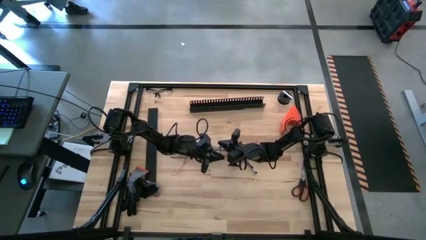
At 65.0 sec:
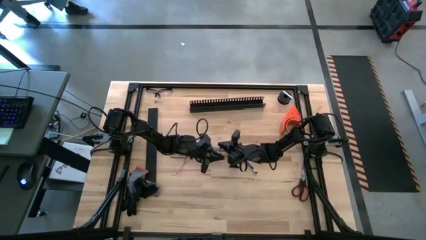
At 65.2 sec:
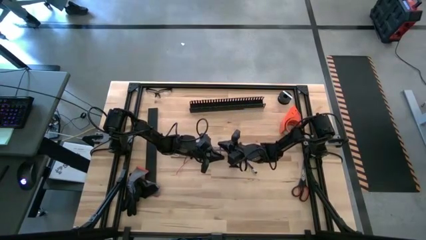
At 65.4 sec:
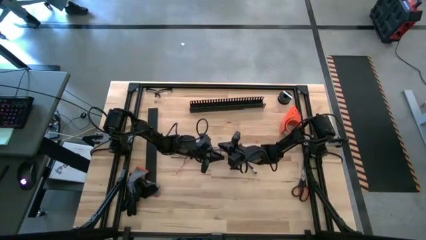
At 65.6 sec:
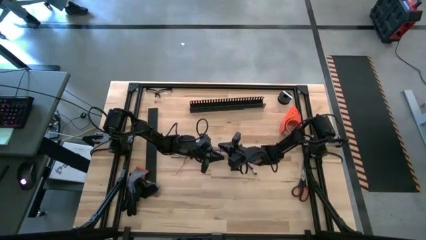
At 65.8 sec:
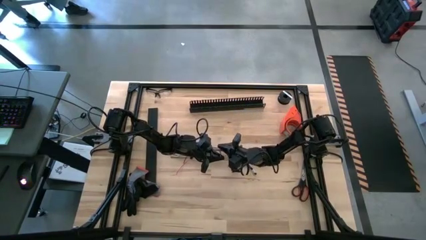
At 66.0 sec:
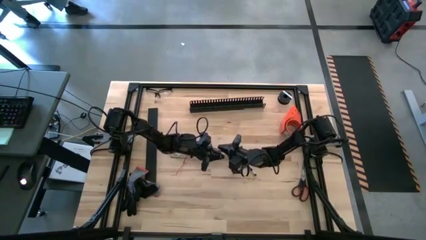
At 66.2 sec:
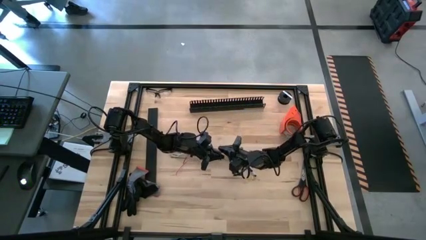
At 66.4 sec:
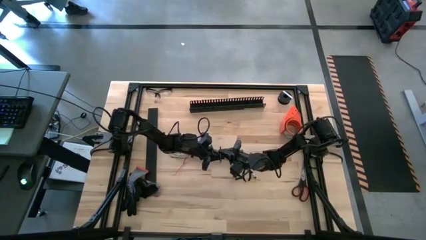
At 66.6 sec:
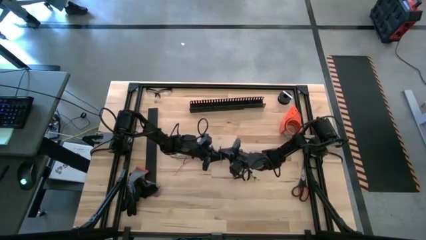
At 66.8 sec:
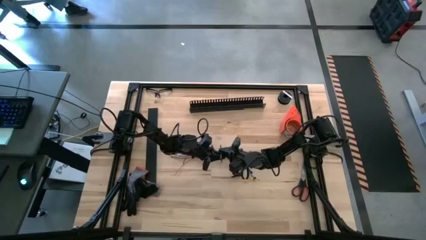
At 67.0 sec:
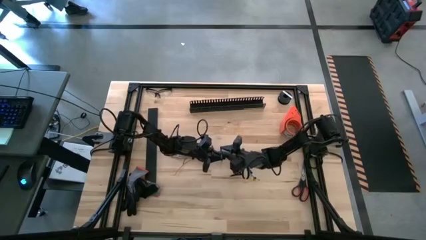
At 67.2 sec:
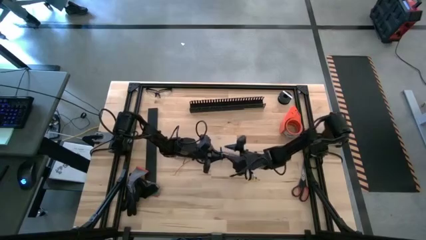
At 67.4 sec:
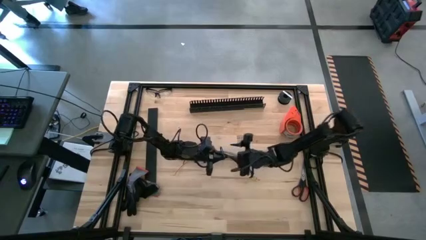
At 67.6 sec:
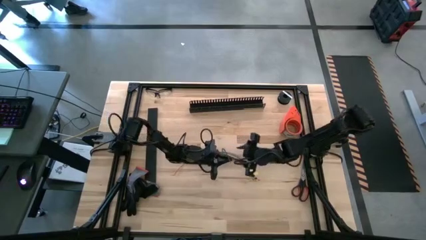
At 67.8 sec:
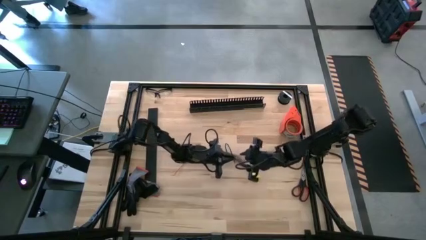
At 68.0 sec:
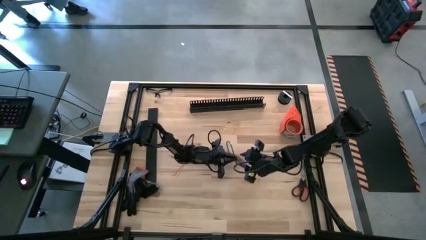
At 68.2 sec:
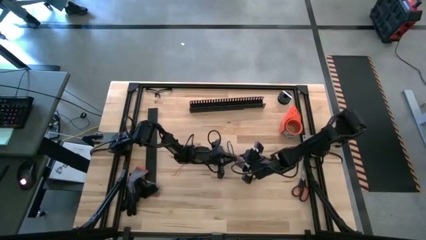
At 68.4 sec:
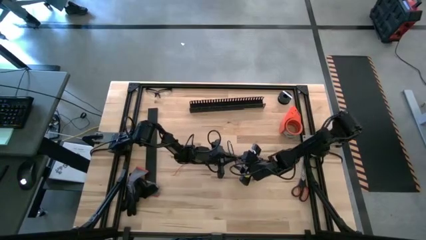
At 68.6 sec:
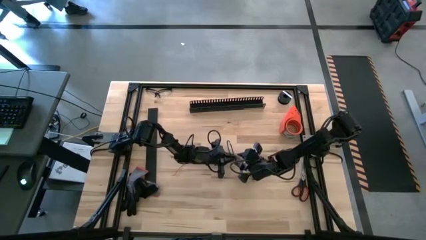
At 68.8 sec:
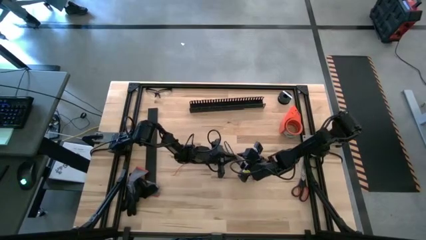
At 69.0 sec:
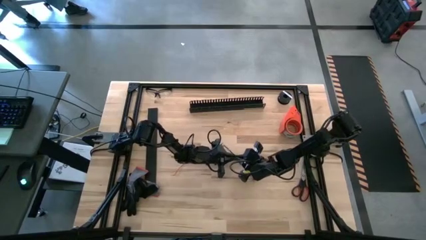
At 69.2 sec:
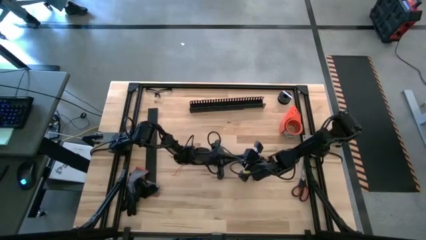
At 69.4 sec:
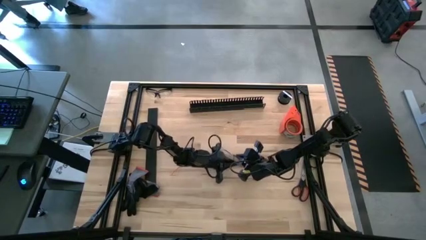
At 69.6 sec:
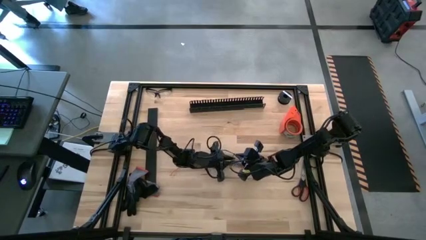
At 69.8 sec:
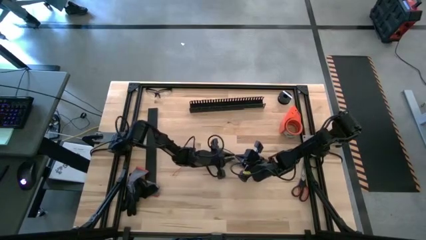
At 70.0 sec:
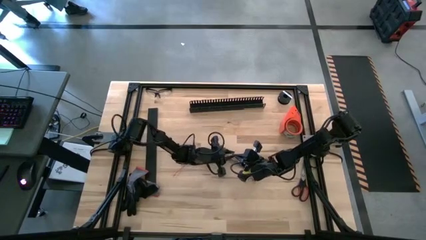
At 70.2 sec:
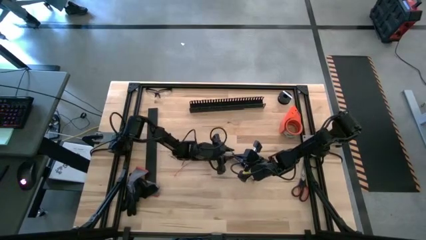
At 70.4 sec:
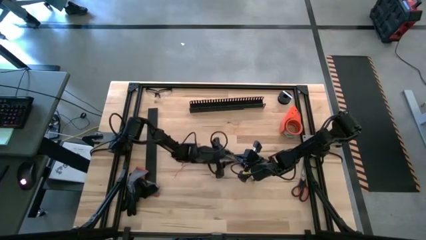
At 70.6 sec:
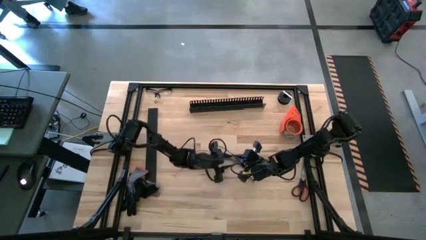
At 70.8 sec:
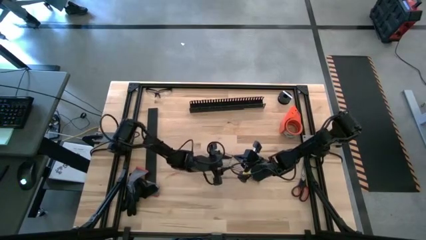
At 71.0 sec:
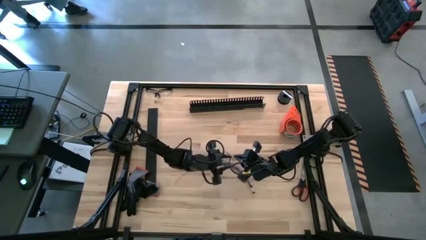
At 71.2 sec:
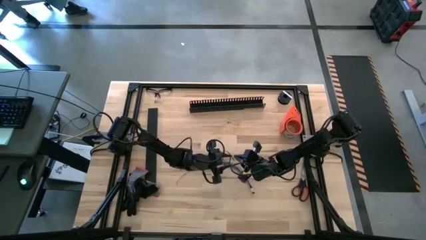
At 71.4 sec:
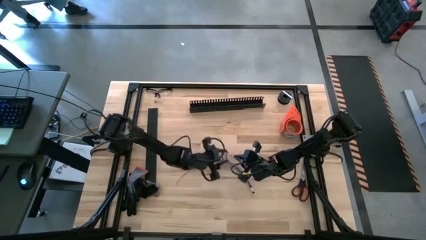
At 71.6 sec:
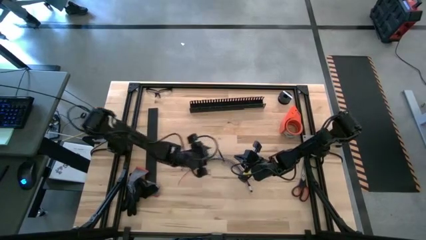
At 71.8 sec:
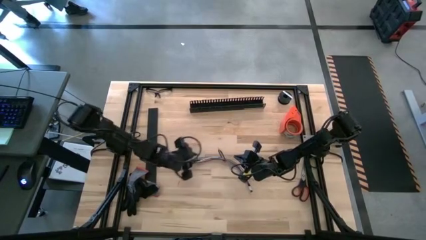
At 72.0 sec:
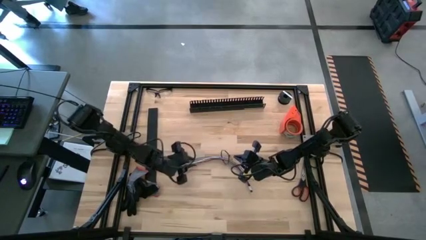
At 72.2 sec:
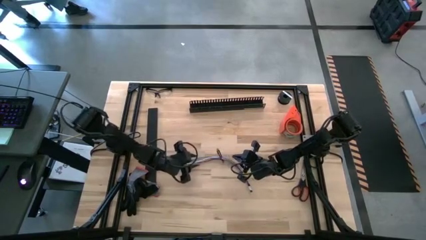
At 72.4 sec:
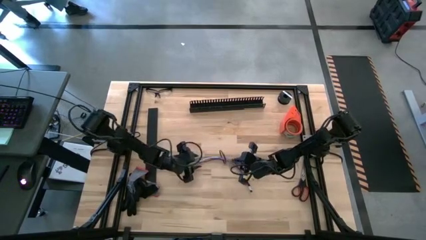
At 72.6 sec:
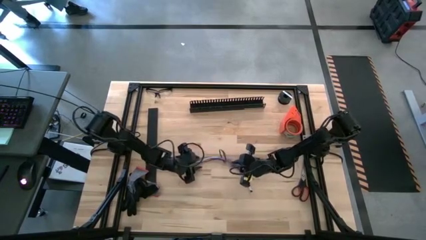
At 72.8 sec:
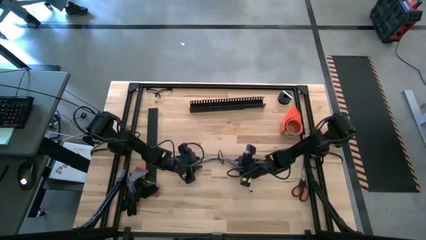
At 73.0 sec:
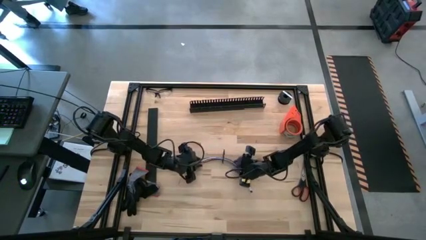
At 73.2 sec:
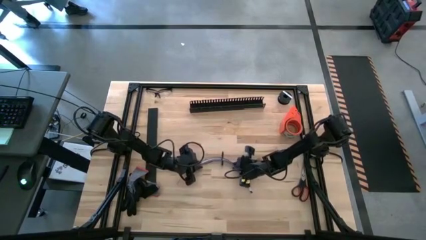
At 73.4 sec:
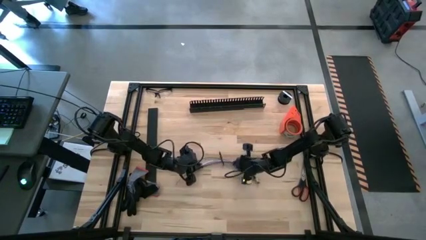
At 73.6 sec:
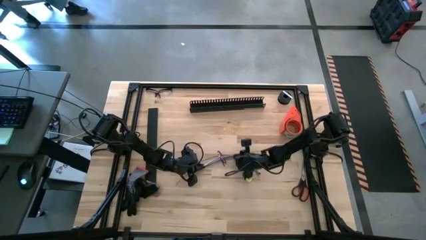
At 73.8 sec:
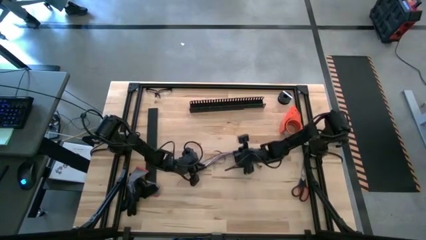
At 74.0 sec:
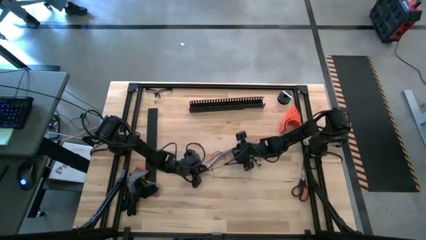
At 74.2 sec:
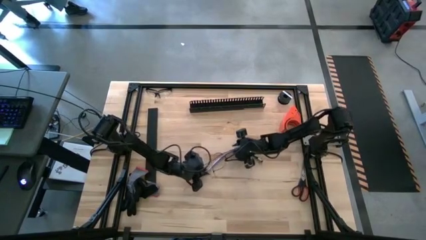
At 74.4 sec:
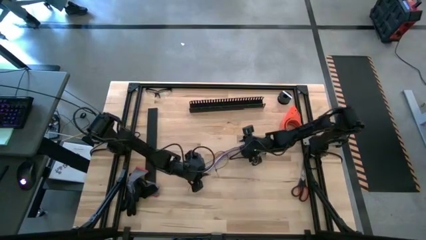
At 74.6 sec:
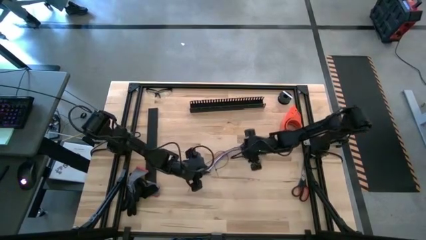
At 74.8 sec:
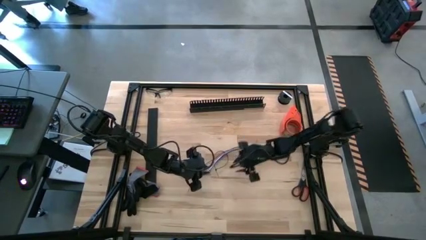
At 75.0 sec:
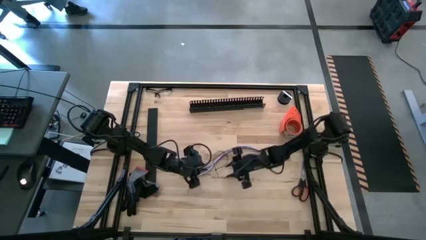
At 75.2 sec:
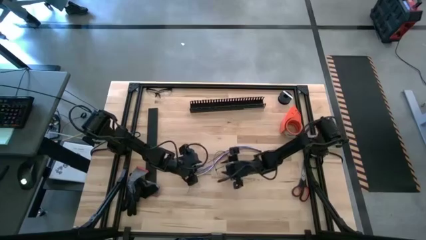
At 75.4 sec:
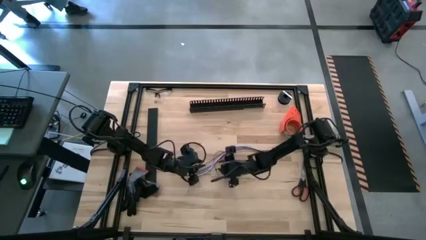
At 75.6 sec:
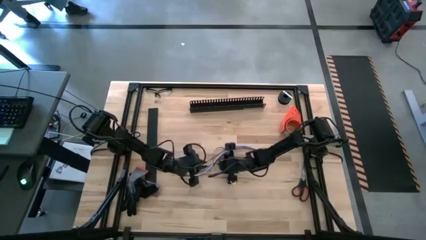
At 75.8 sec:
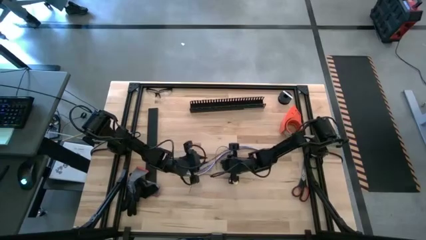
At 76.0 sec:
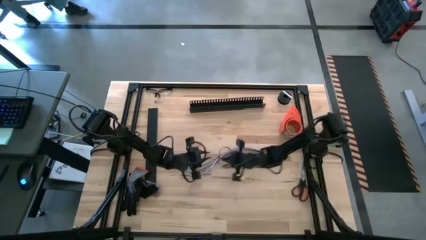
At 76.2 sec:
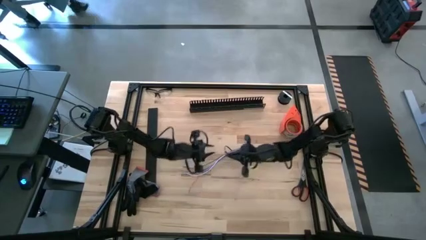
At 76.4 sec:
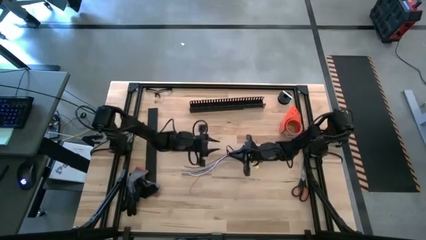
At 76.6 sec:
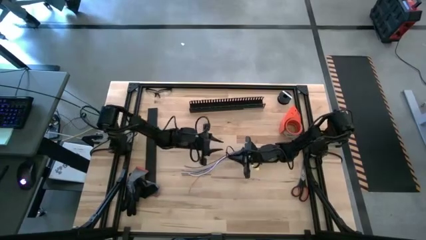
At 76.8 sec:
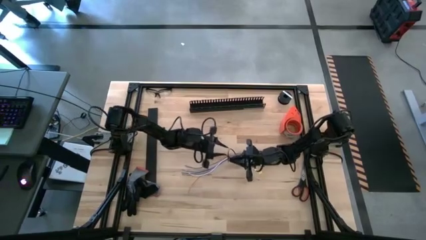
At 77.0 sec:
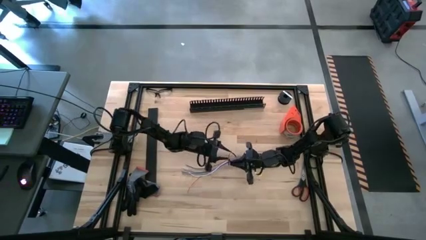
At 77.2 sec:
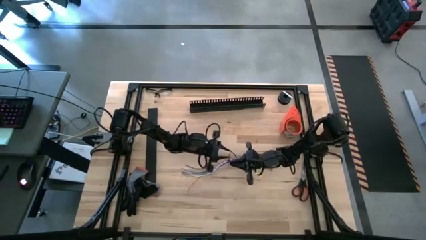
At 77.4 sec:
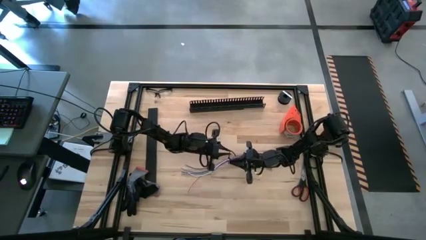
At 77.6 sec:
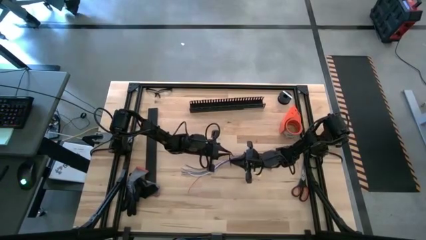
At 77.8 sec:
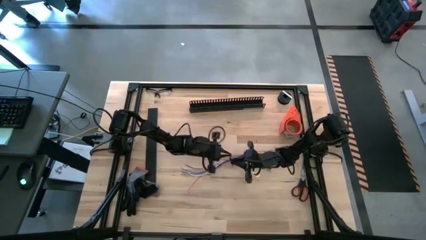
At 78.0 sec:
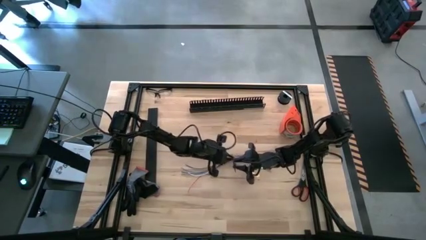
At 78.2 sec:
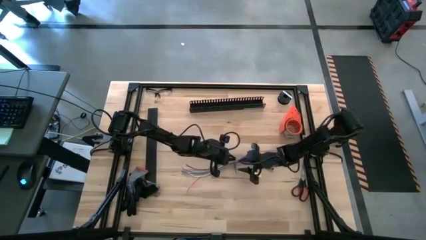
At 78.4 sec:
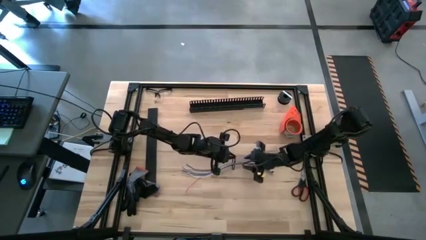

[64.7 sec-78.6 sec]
Task: Ziptie cables
Wrap the zip tie around the cable wire

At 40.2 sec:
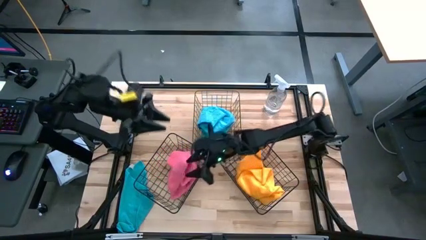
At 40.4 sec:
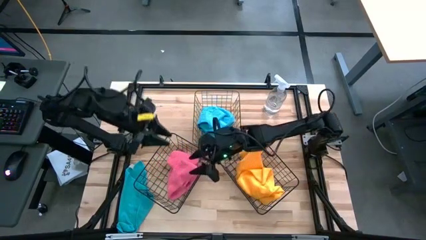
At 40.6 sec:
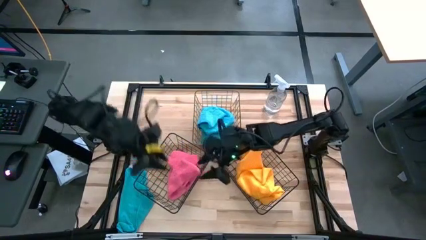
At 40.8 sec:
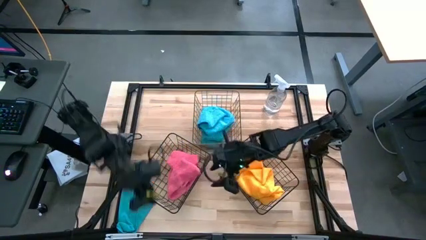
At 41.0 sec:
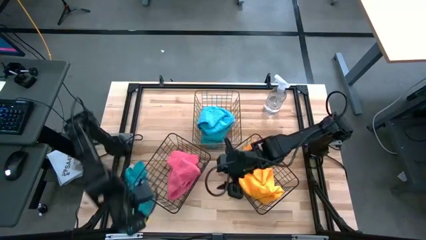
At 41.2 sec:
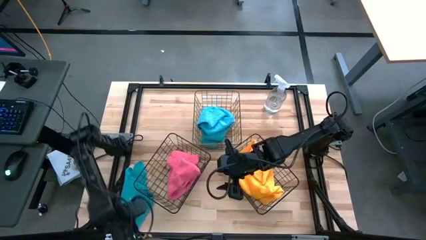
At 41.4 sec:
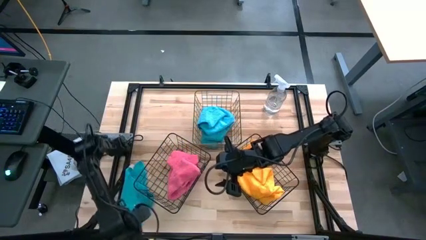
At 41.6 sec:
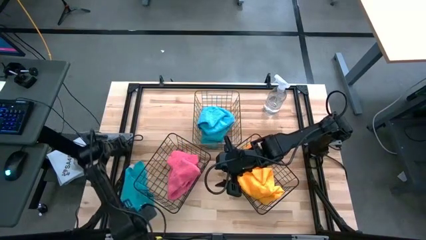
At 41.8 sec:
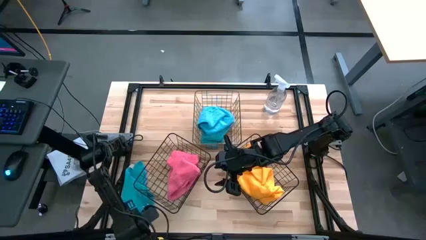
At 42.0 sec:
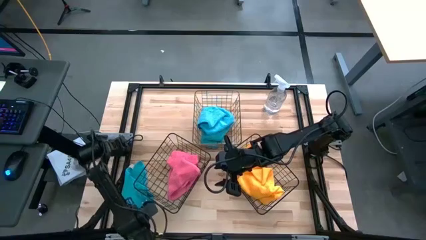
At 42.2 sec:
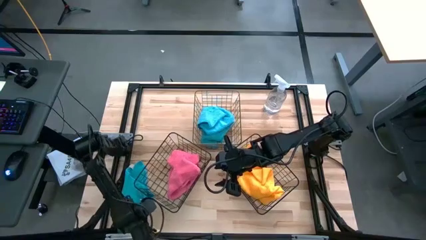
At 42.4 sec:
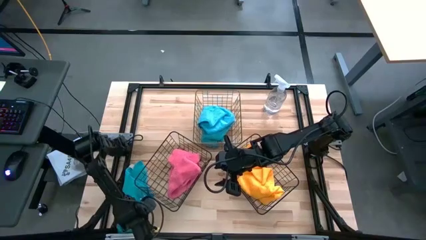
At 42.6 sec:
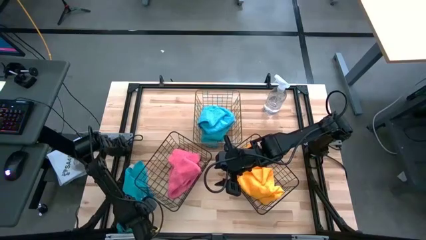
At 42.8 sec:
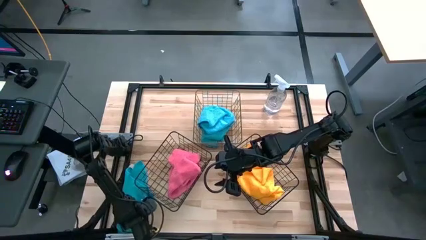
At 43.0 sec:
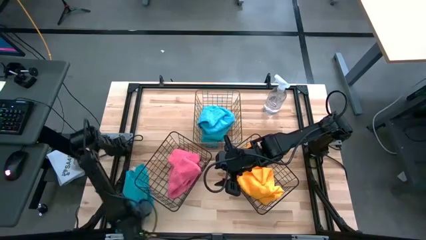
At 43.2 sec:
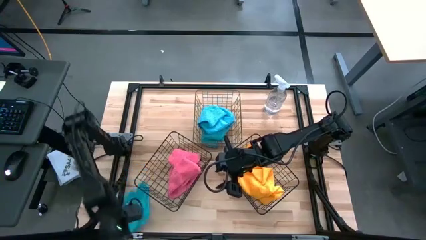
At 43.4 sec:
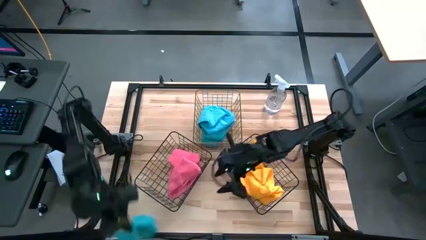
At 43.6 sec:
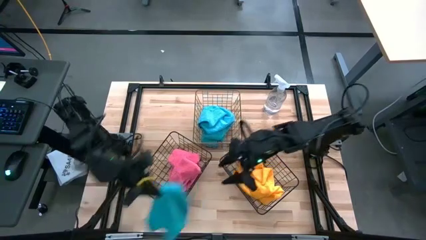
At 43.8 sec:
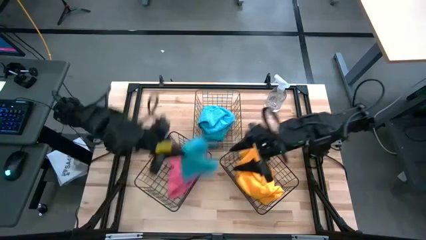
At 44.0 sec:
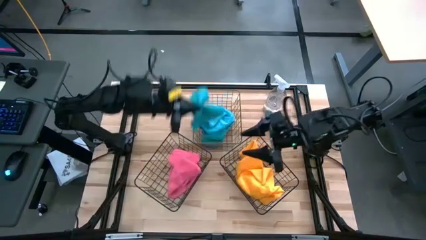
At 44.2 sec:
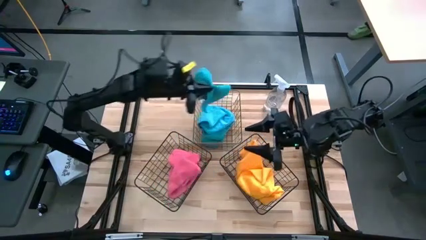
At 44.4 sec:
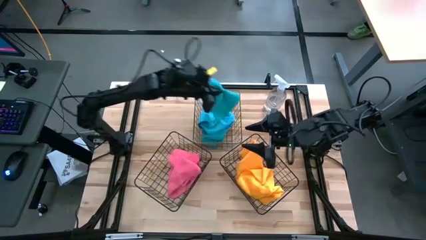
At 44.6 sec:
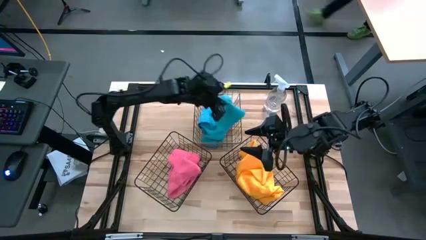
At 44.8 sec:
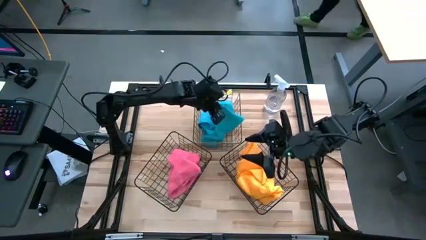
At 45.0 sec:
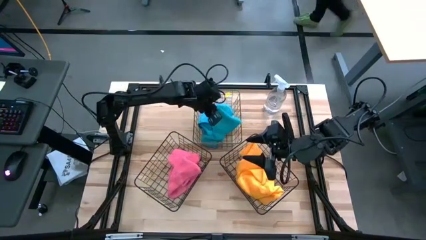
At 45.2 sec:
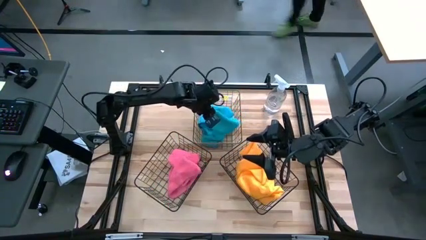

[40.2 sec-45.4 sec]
Task: Sort microfiber towel by color & place in baskets
Put the blue microfiber cloth into the top wire basket
